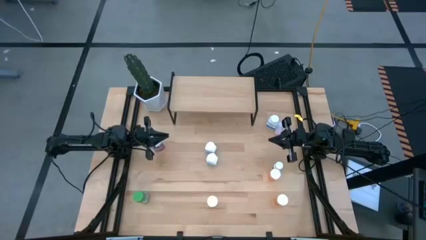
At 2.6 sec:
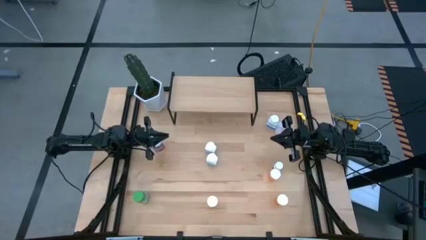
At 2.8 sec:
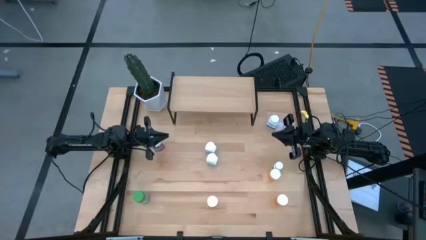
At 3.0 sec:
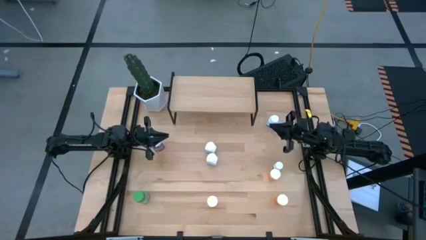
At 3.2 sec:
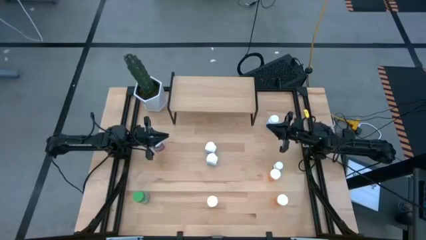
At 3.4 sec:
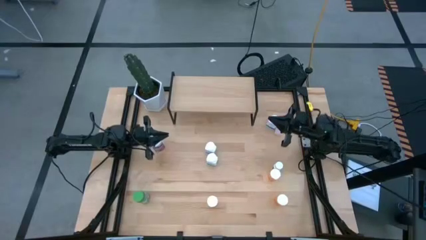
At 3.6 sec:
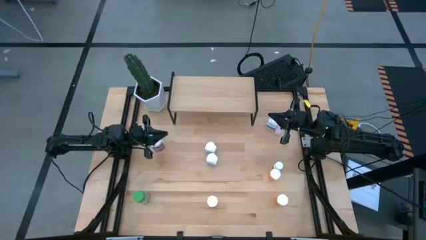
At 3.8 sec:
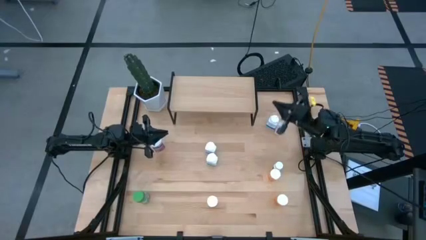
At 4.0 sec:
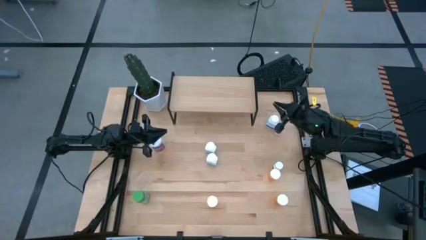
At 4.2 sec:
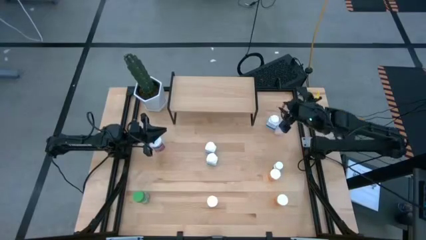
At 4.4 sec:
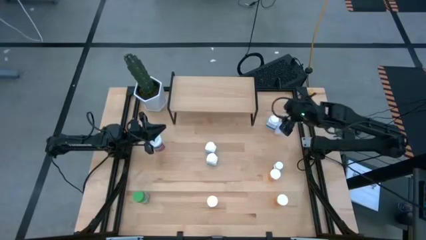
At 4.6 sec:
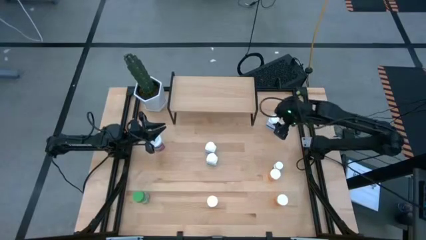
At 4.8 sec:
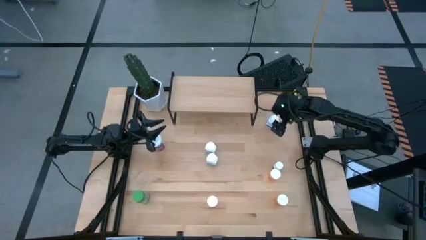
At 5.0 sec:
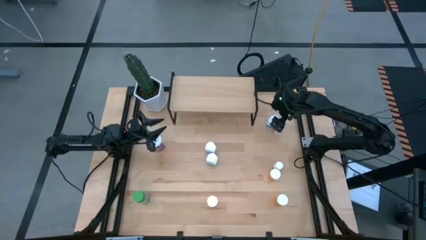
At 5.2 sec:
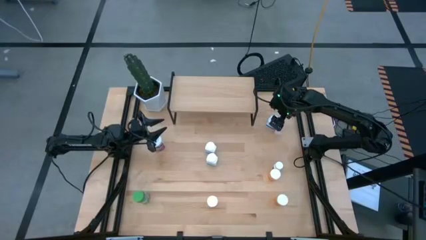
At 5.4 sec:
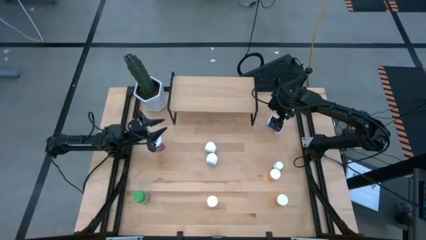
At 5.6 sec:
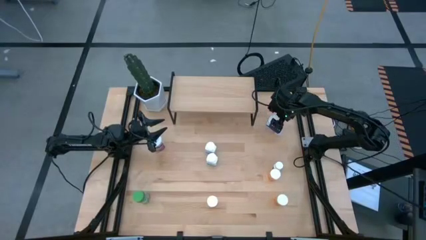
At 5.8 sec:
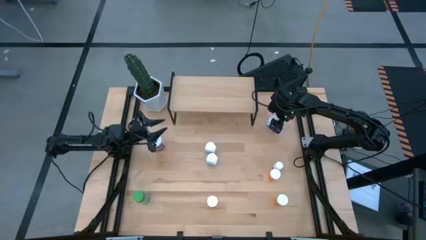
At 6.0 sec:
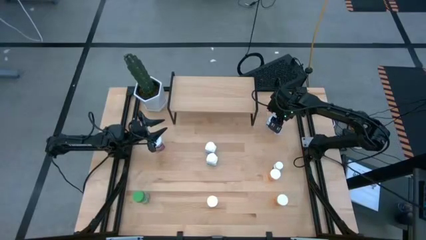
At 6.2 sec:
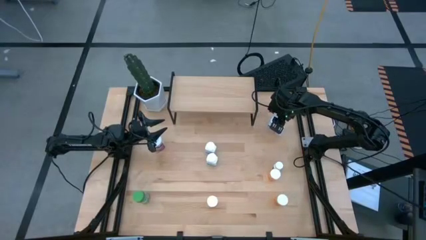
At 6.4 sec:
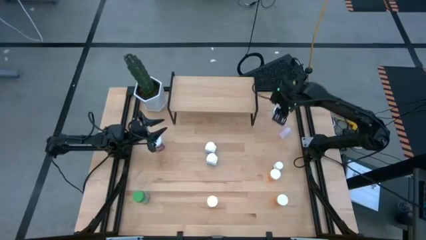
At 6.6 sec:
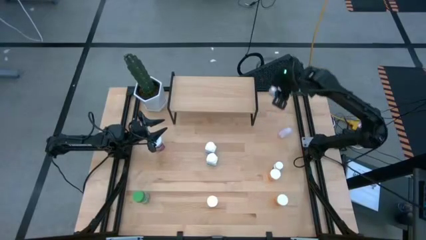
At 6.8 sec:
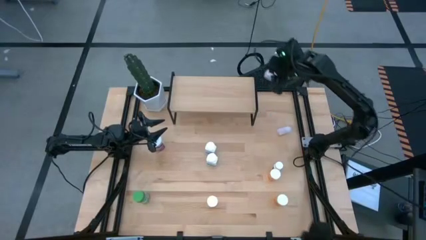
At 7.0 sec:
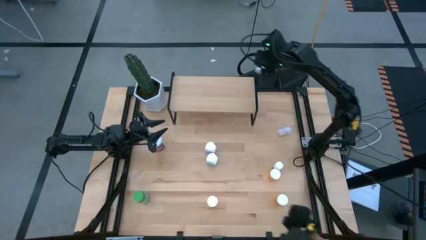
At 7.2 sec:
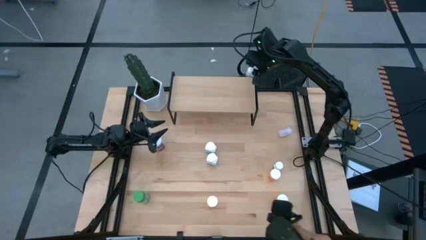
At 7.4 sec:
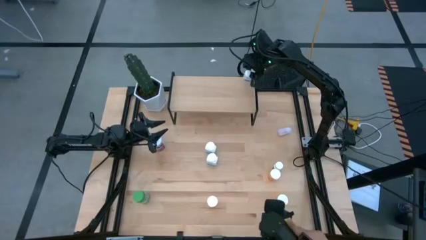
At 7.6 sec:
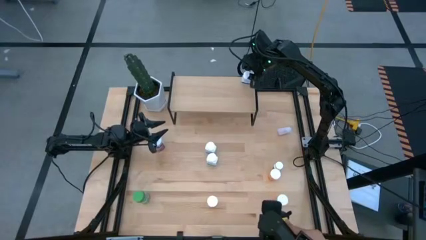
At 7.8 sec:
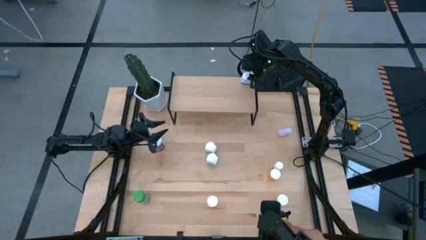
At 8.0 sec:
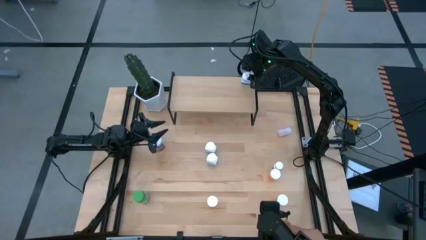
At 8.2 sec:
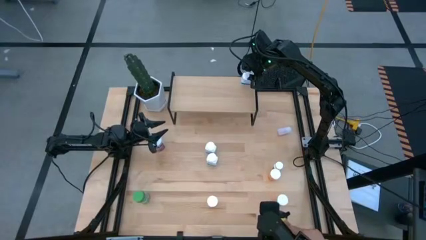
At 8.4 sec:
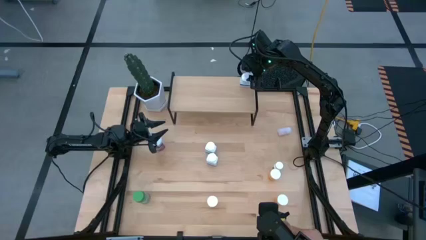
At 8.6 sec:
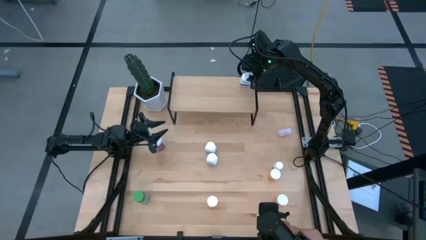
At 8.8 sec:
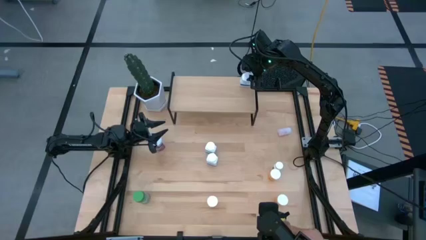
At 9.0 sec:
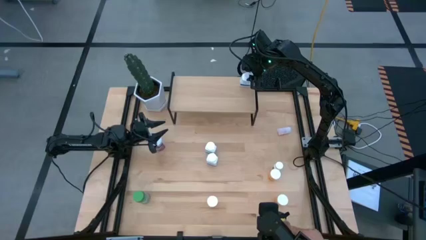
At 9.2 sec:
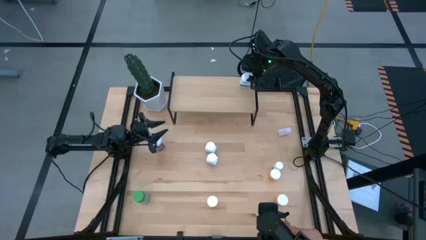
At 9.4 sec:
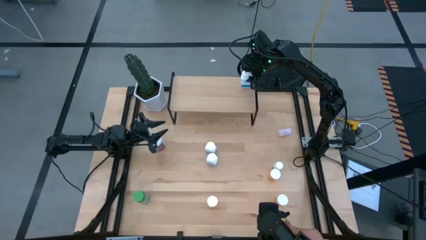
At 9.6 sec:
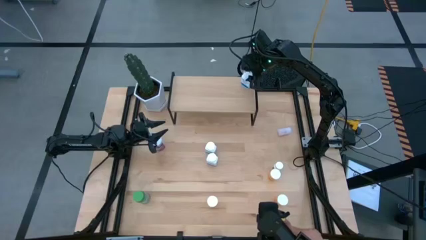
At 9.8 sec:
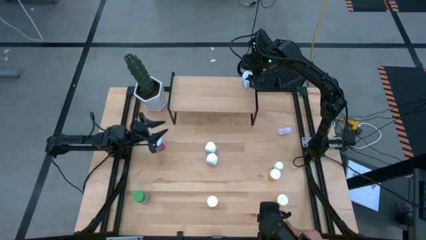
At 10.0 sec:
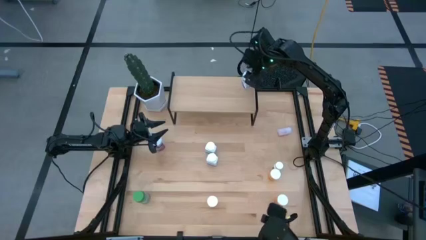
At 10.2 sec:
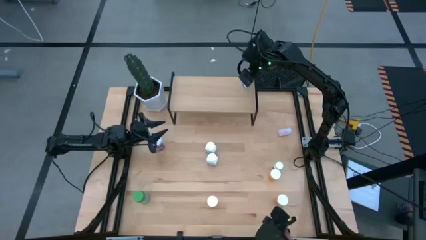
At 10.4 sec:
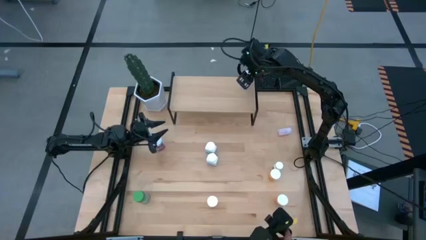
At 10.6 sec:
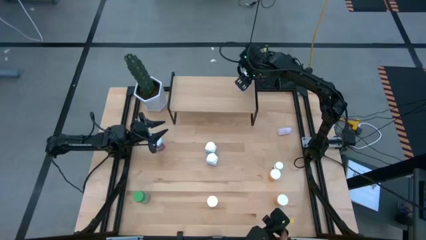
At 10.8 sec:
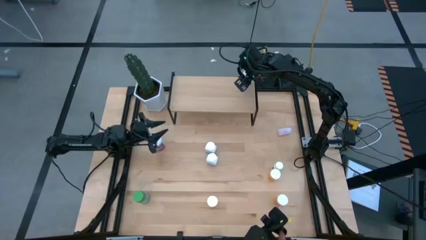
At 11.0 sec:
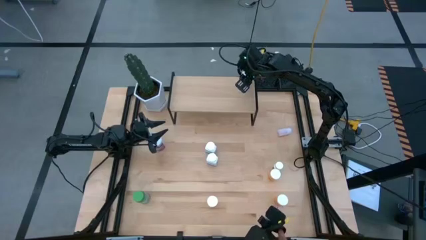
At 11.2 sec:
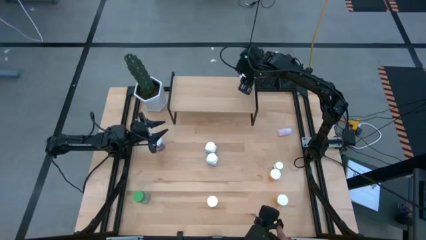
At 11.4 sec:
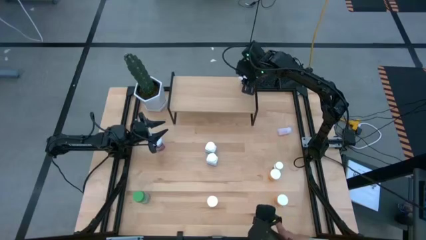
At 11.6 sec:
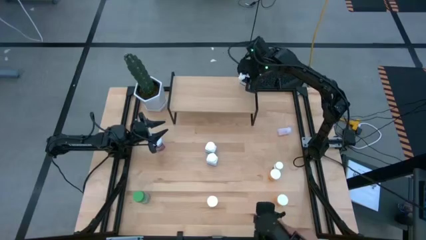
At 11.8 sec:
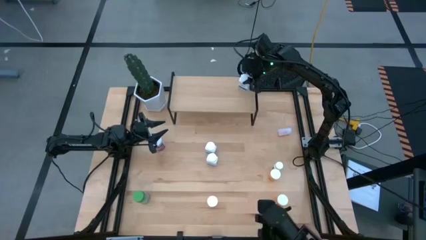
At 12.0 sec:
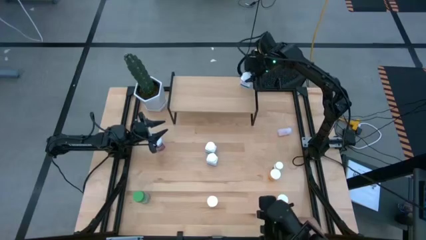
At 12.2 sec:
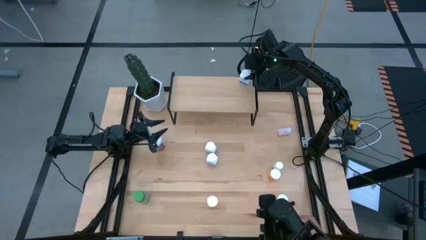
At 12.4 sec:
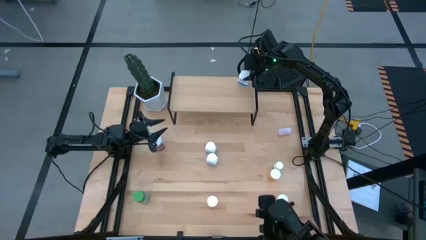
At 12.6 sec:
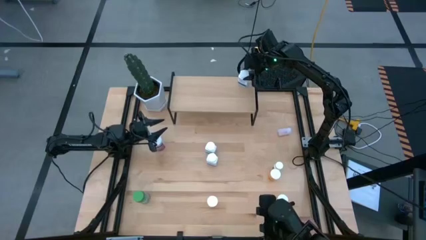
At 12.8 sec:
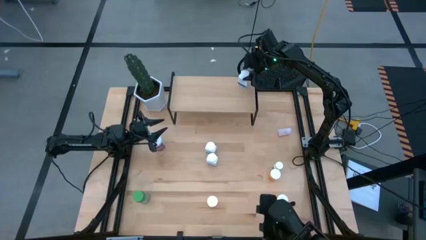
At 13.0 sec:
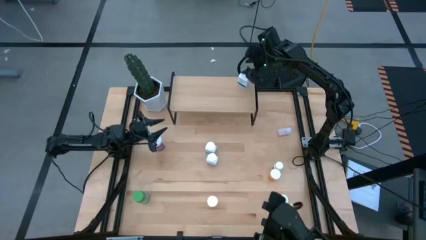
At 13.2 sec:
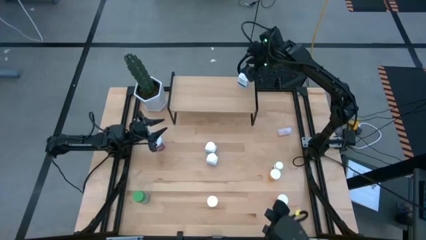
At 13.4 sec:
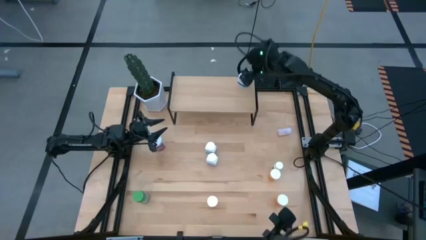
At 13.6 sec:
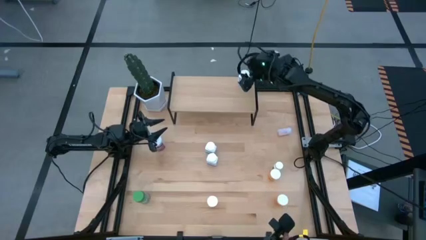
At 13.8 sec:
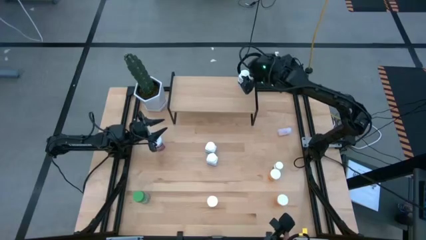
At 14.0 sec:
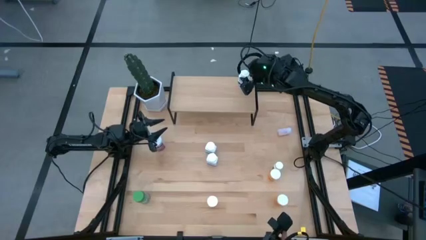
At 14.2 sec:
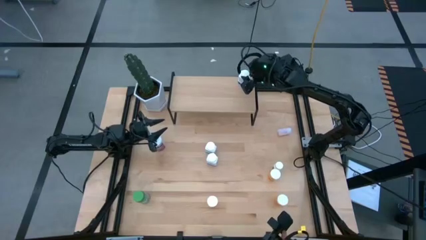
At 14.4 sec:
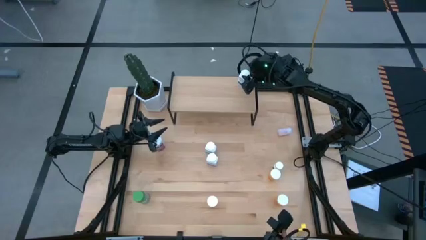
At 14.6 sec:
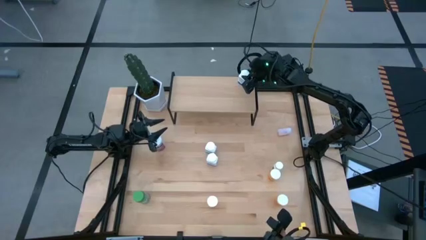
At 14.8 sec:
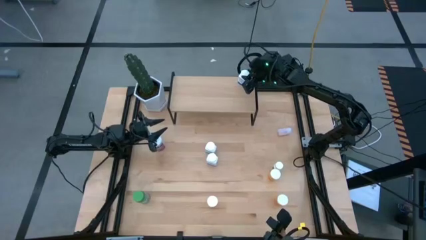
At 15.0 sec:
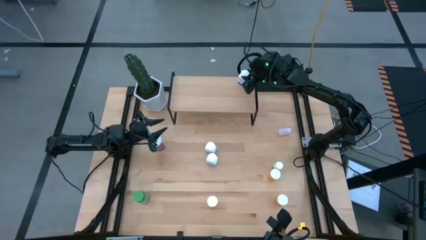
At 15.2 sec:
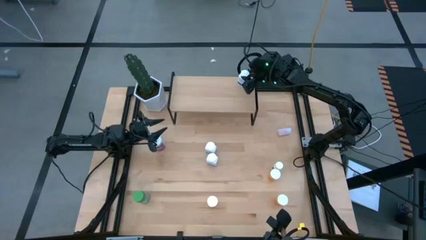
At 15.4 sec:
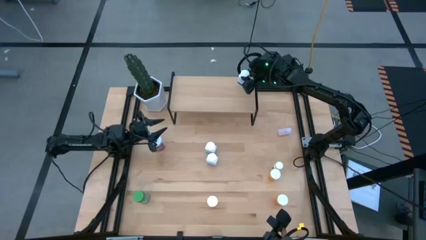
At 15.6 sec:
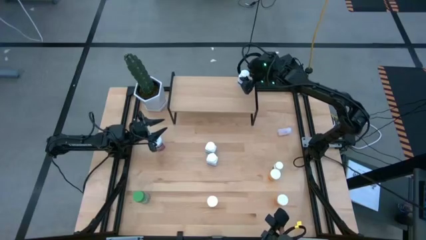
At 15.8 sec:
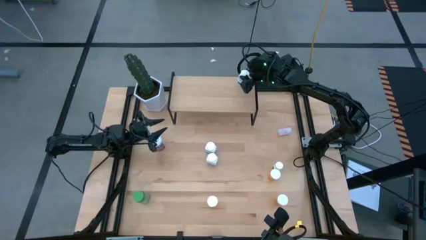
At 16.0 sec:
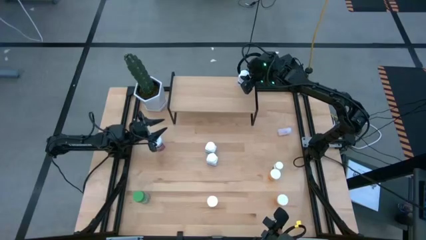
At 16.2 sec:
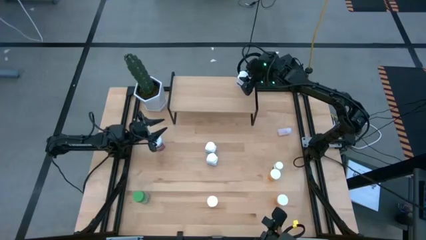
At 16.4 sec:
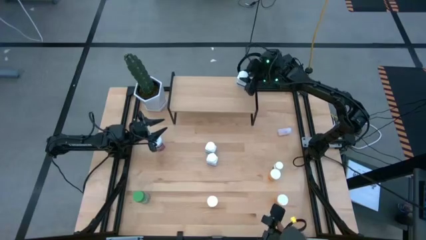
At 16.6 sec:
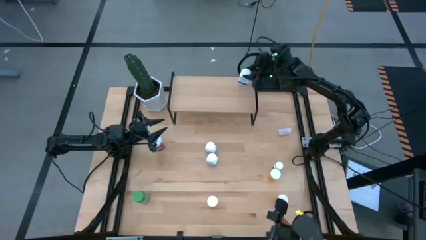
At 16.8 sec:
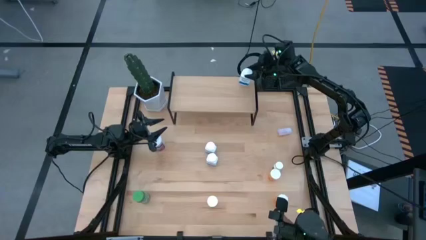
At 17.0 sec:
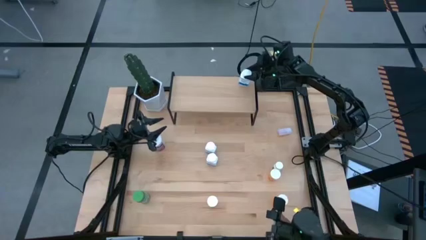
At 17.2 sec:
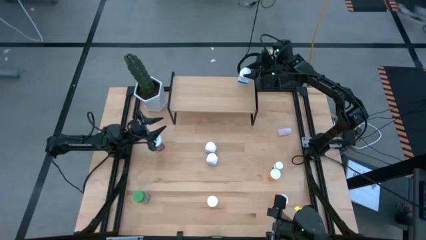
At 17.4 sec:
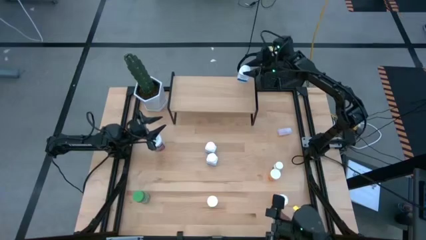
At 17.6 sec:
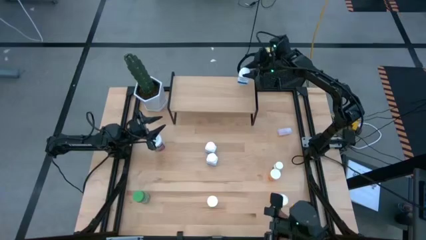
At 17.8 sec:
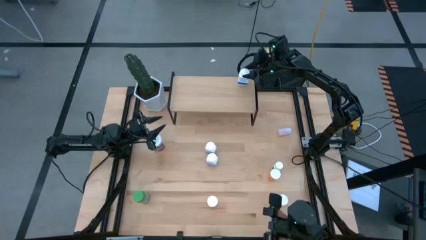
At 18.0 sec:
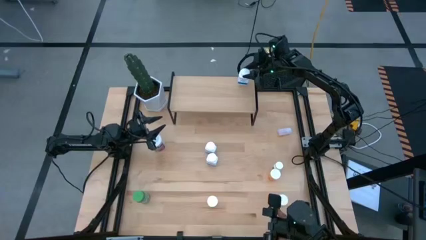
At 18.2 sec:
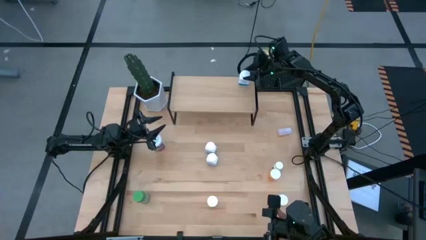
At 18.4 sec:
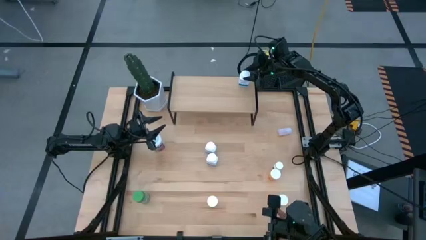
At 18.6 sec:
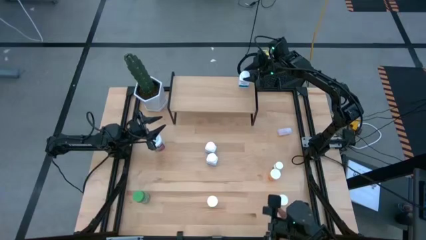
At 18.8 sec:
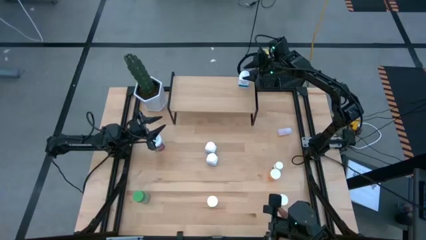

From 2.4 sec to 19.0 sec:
Task: Pick and place medicine bottles onto shelf by color
Put the top right white and blue pill bottle on the shelf
